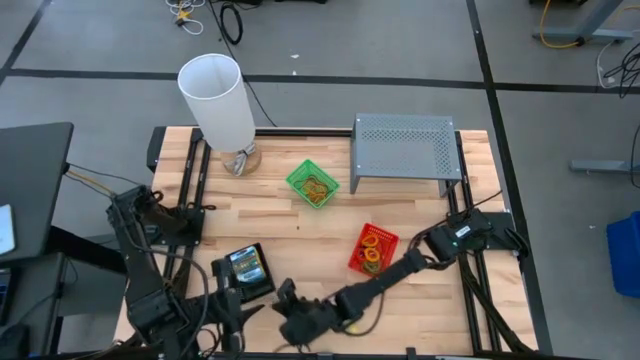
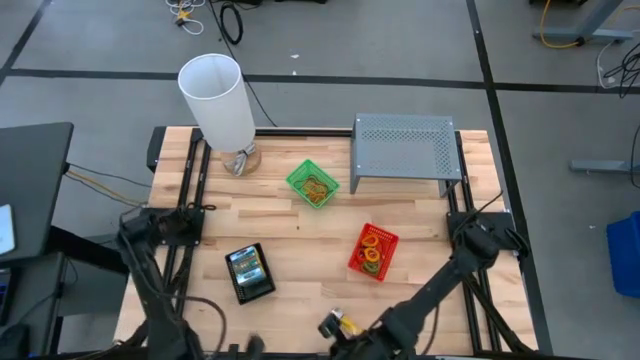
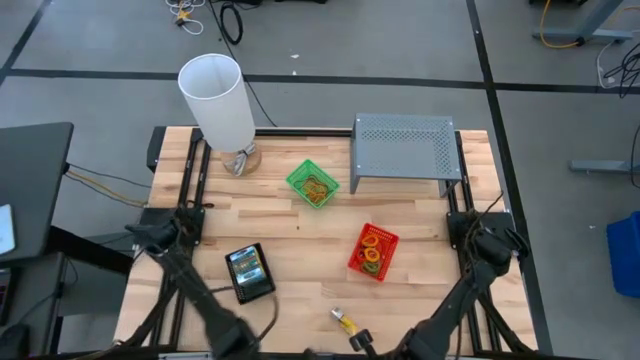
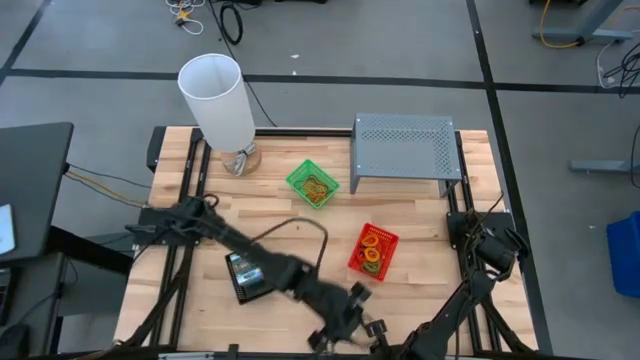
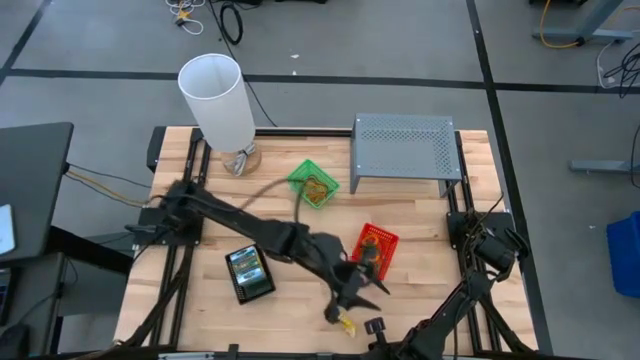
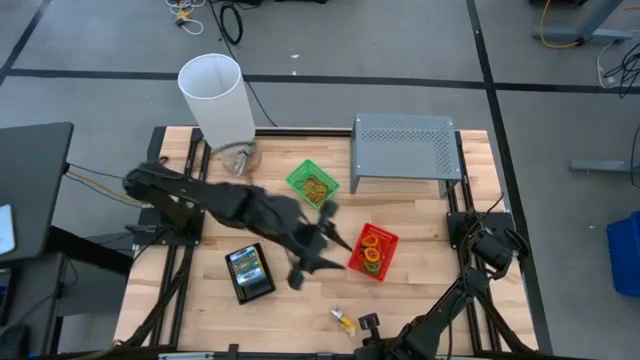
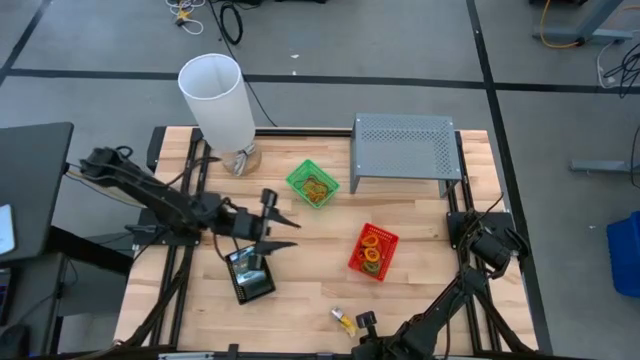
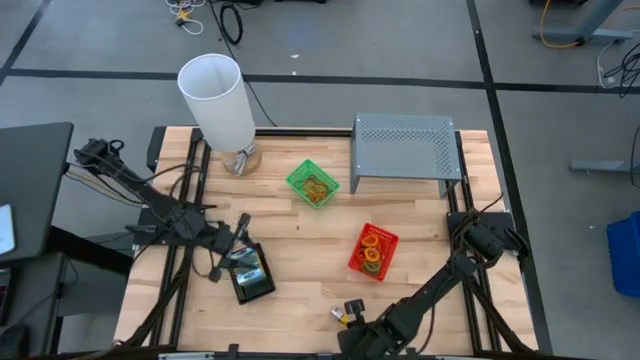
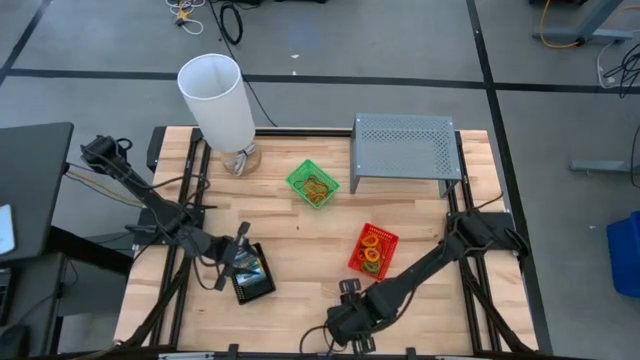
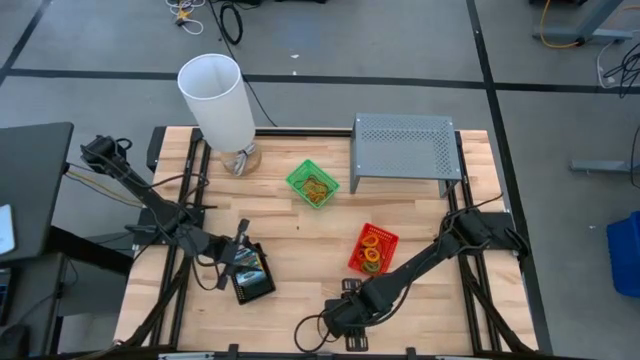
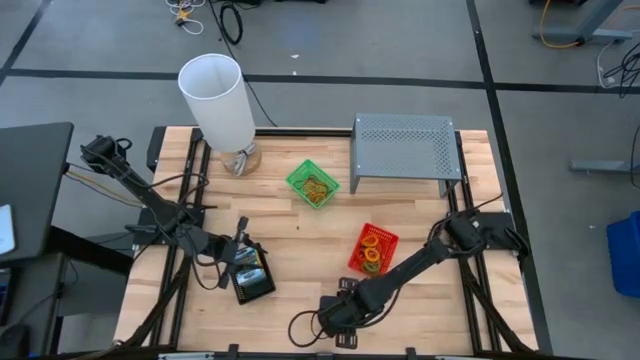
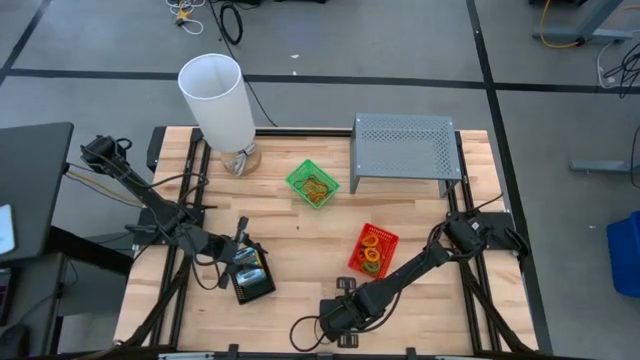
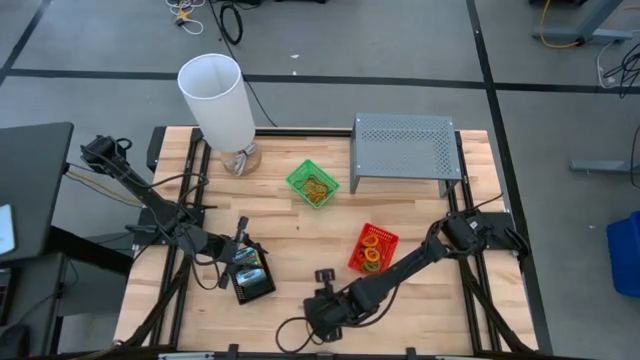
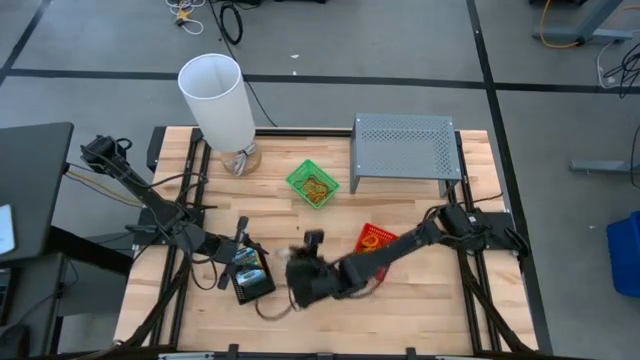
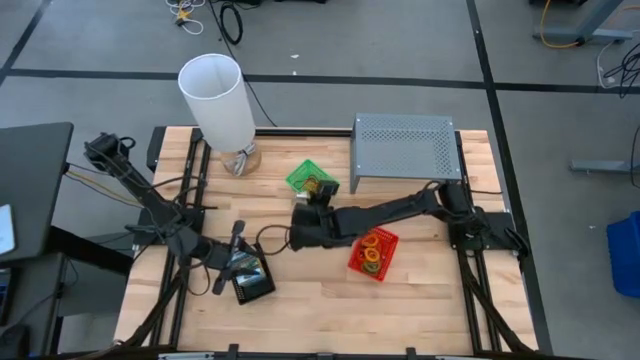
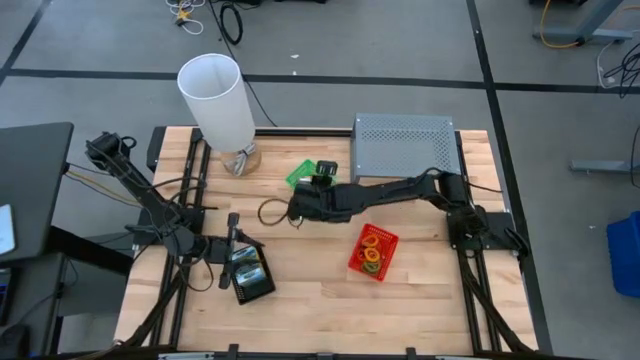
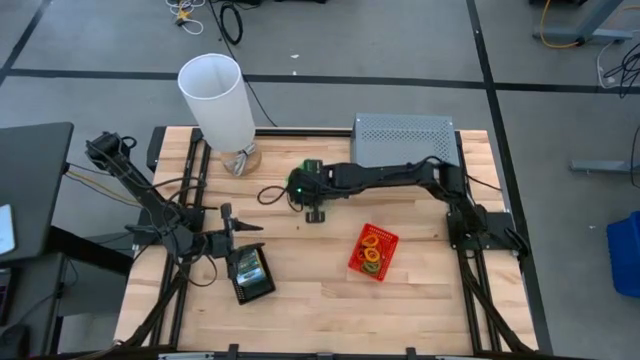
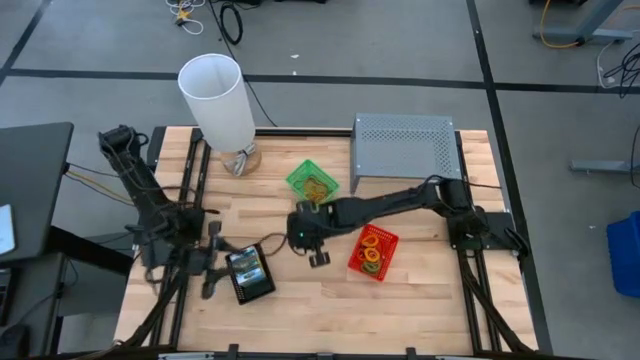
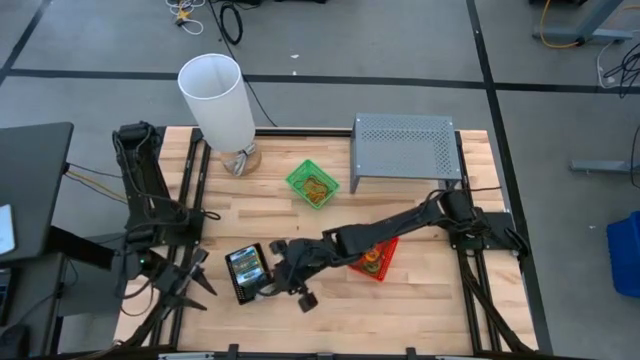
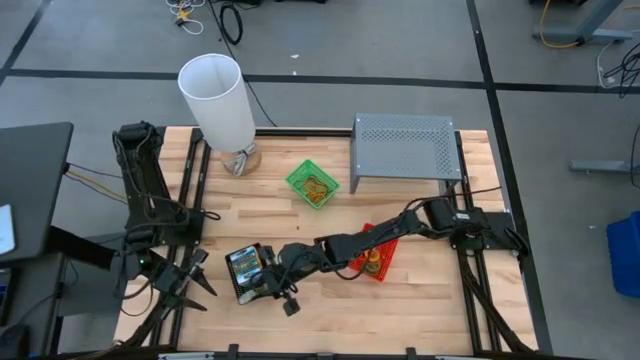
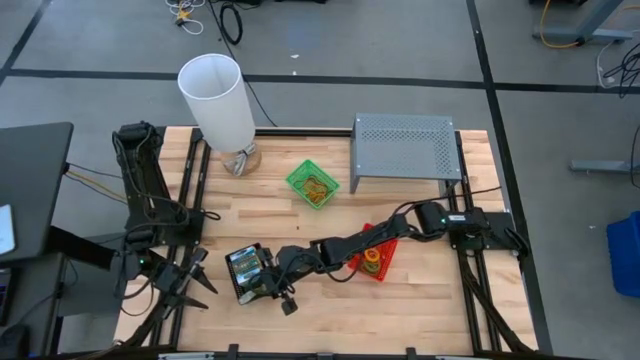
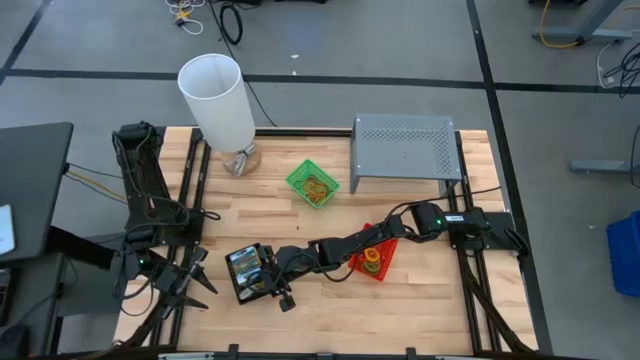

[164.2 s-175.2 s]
Task: Pick & Place Office Desk Supplies
Put the yellow crayon pack into the black bin

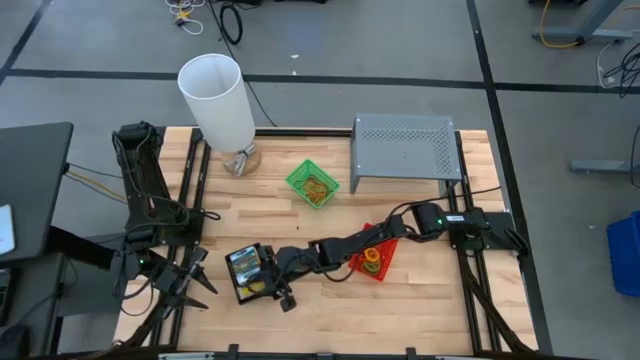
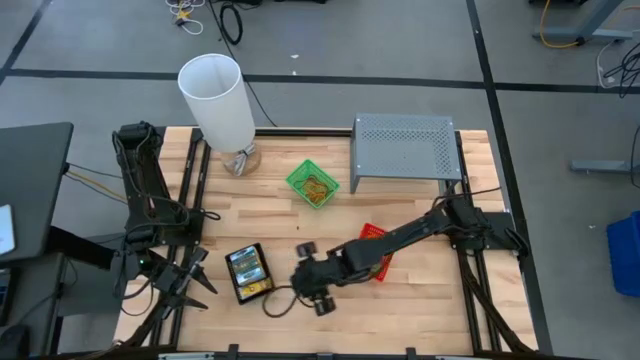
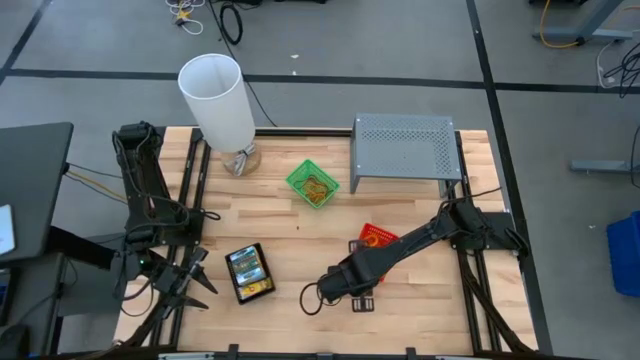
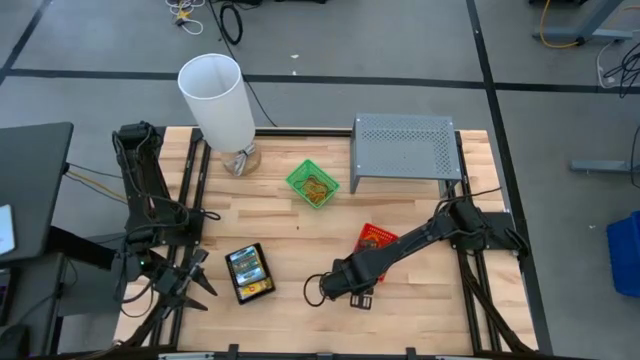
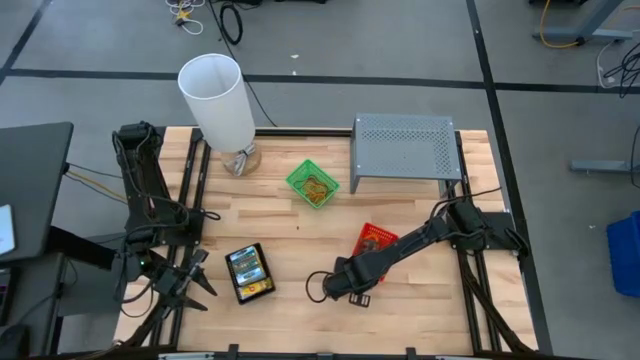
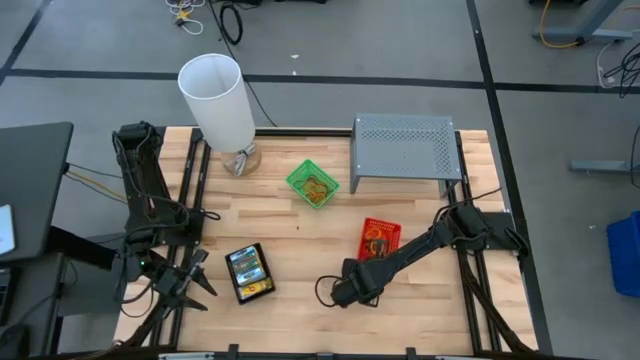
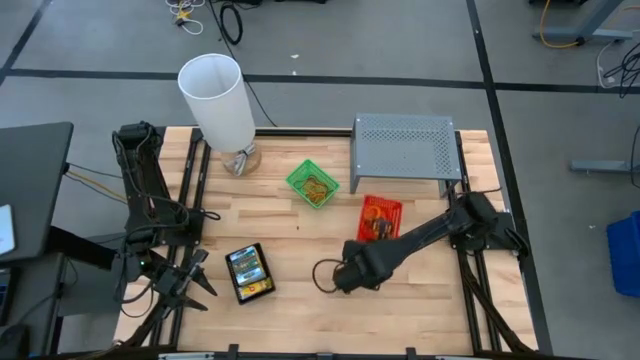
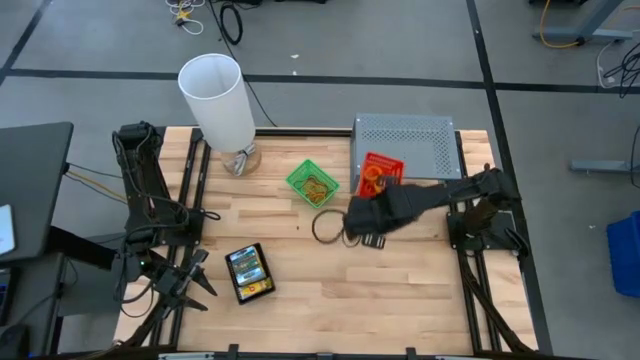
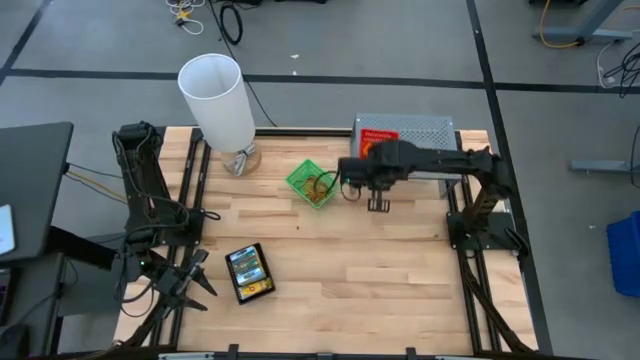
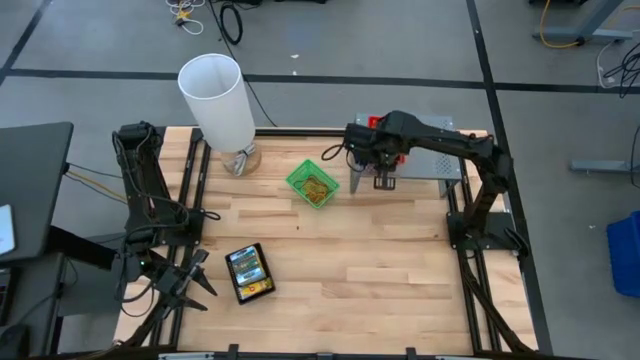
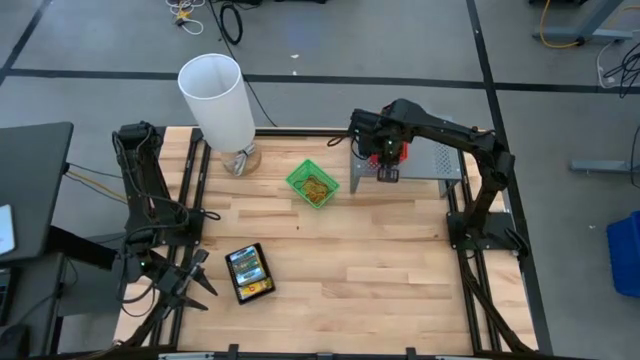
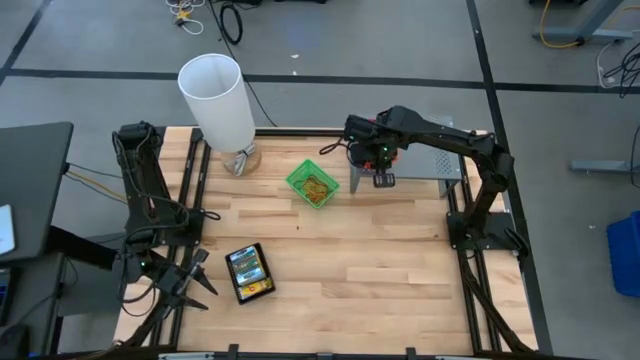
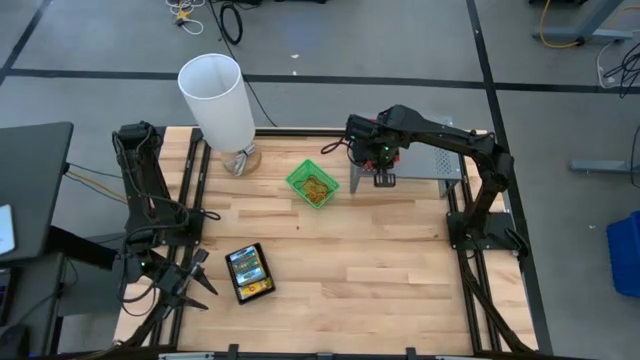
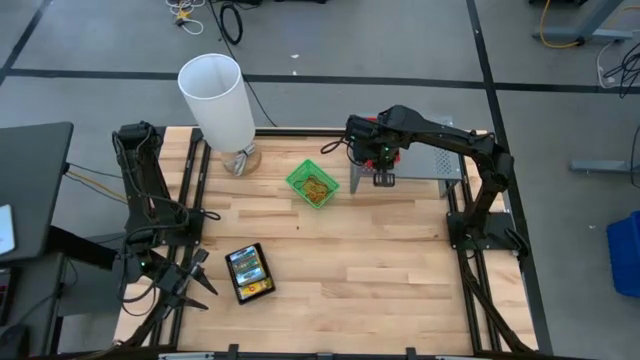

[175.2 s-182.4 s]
Put the red bin on the shelf

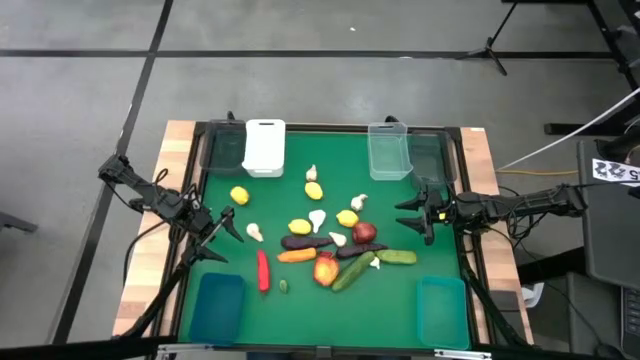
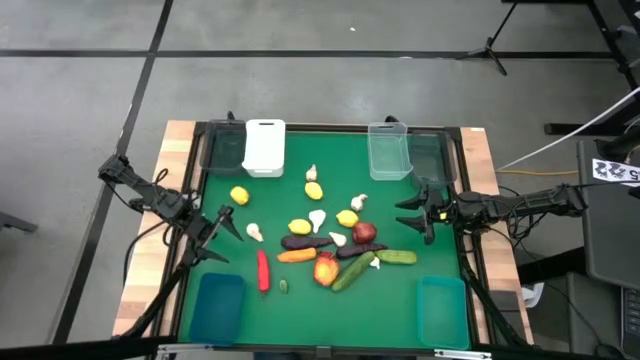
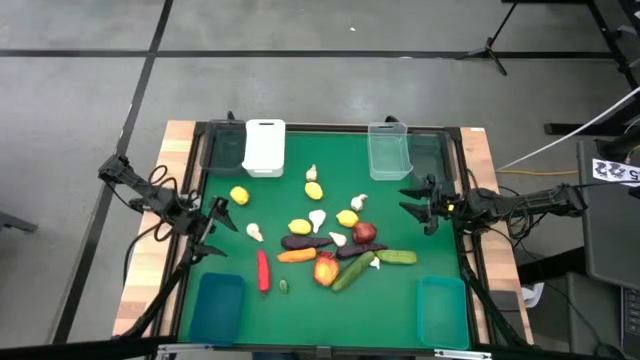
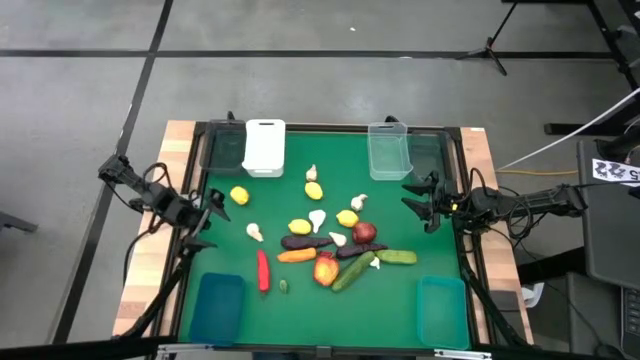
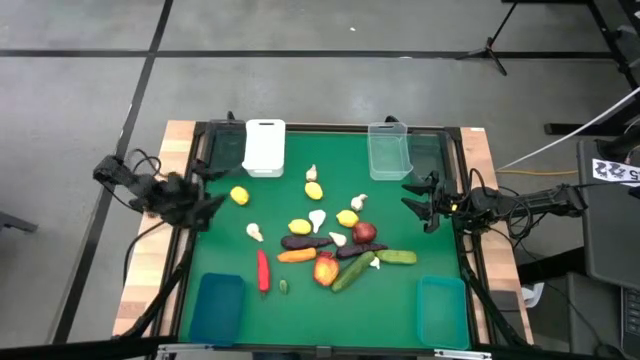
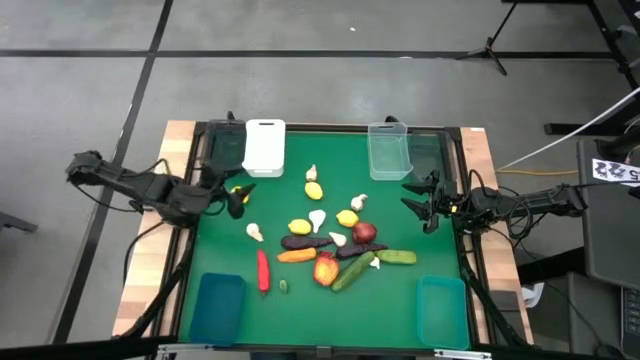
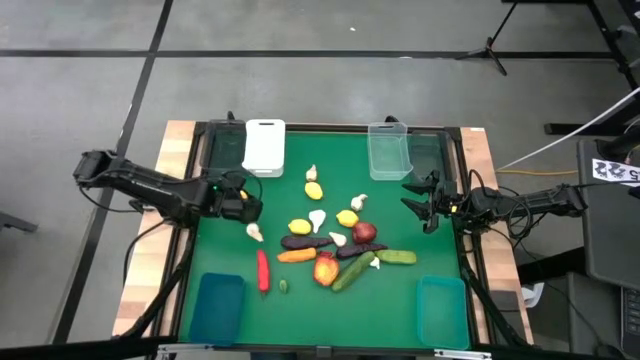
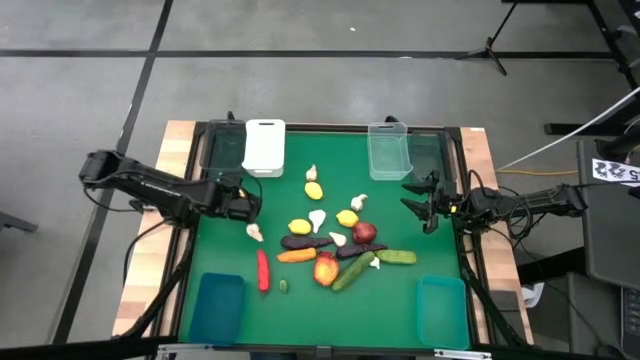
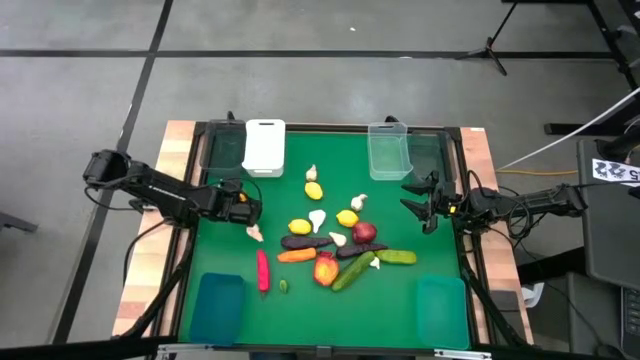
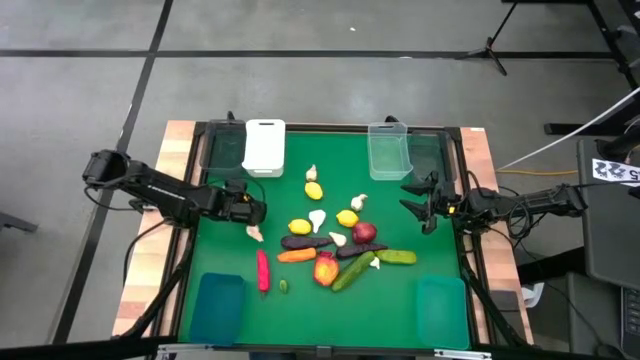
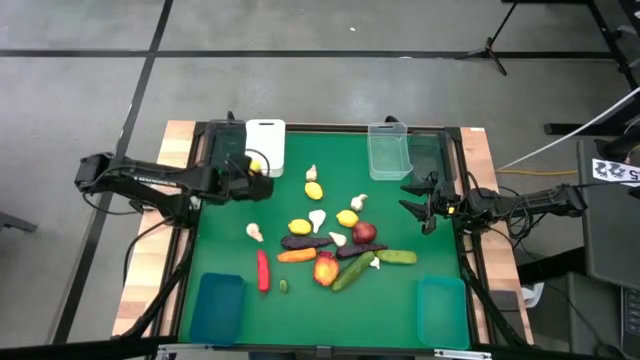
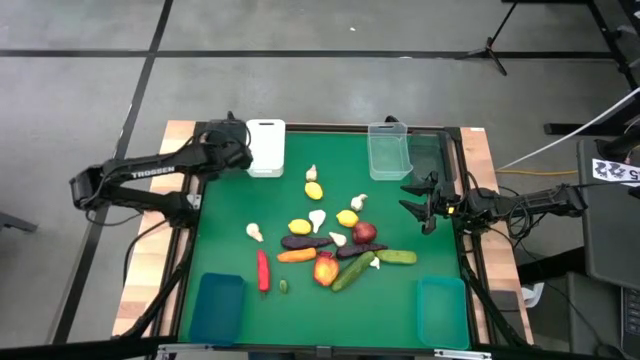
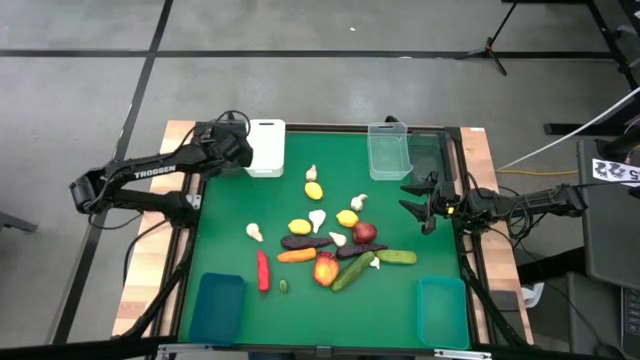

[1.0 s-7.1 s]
Task: Sort produce into baskets
Put the lemon into the left black bin
